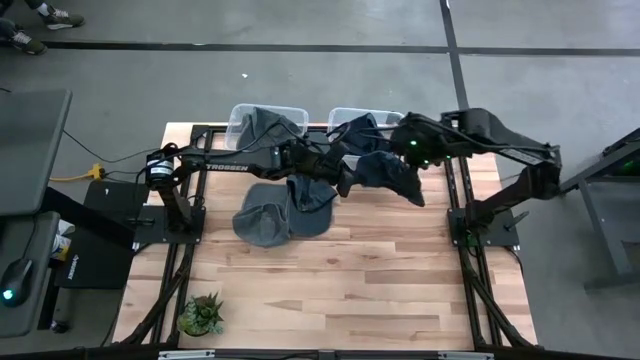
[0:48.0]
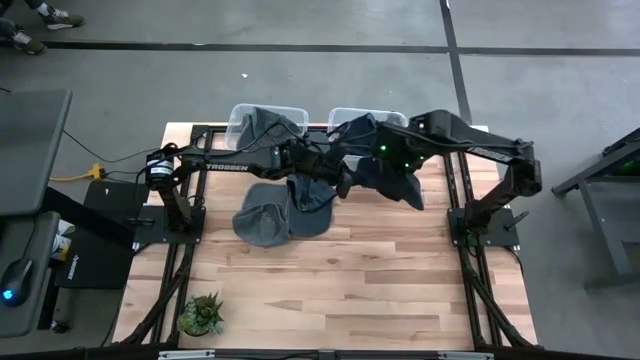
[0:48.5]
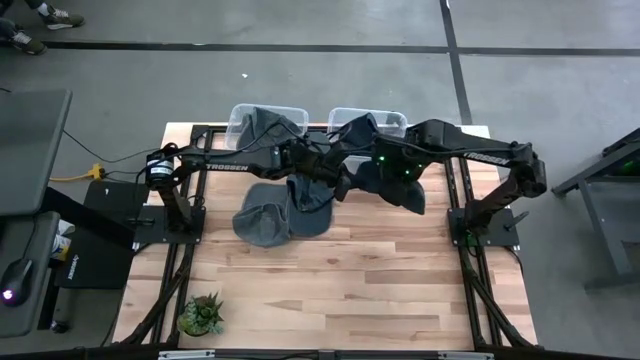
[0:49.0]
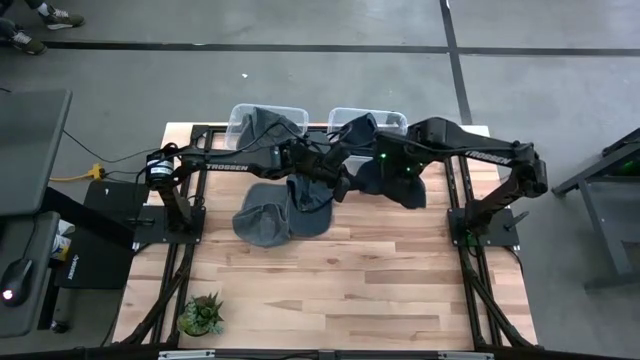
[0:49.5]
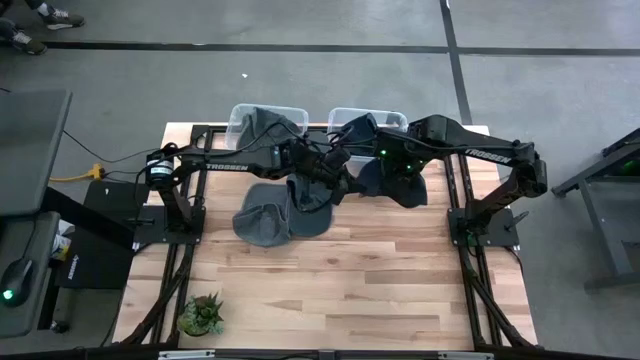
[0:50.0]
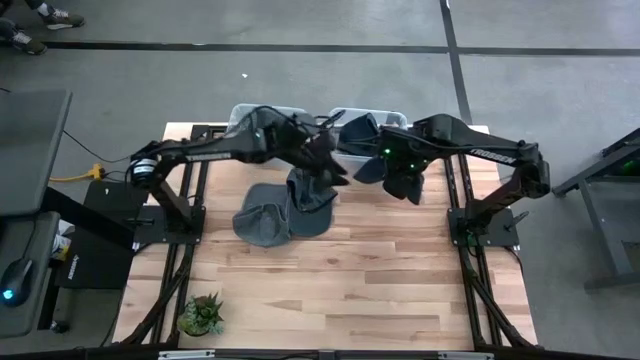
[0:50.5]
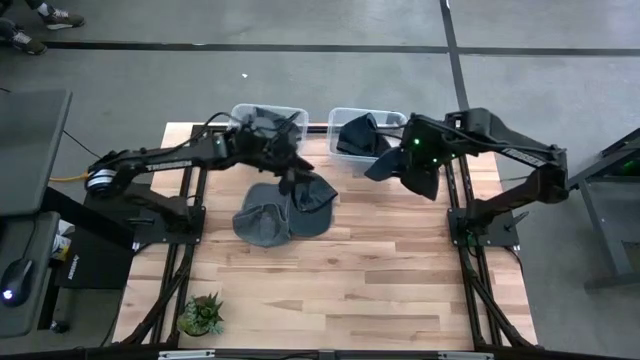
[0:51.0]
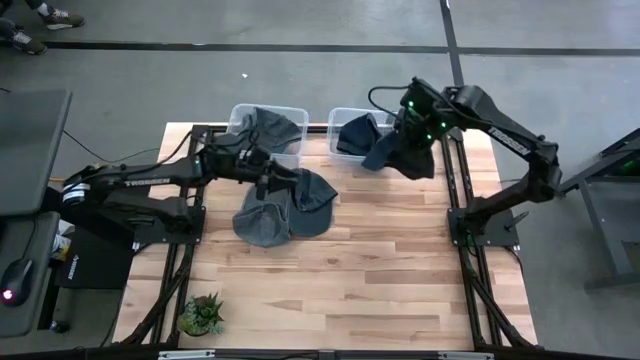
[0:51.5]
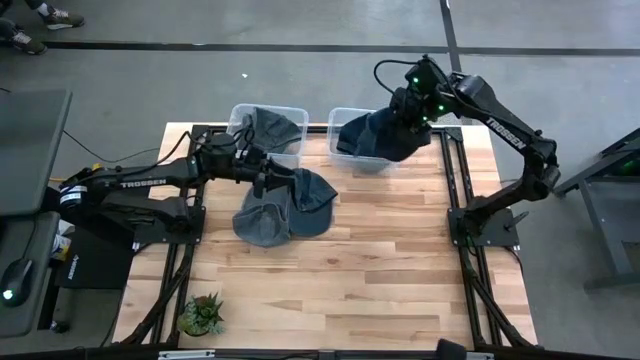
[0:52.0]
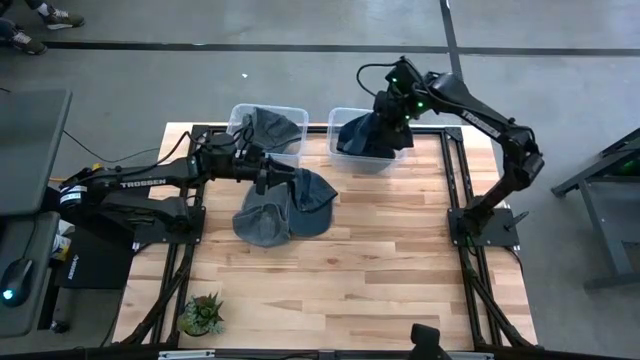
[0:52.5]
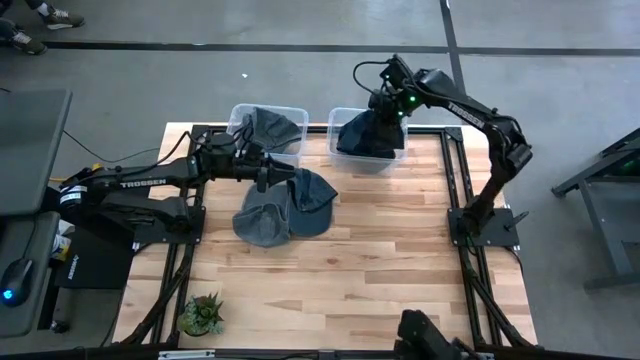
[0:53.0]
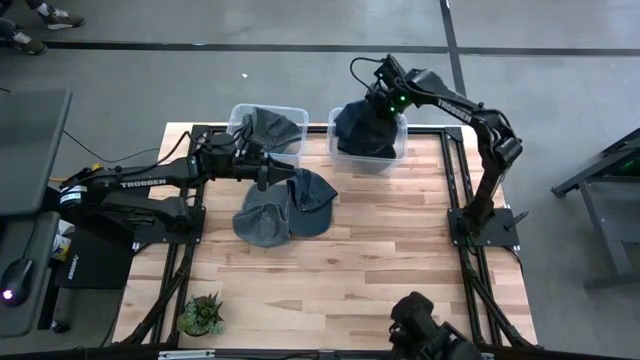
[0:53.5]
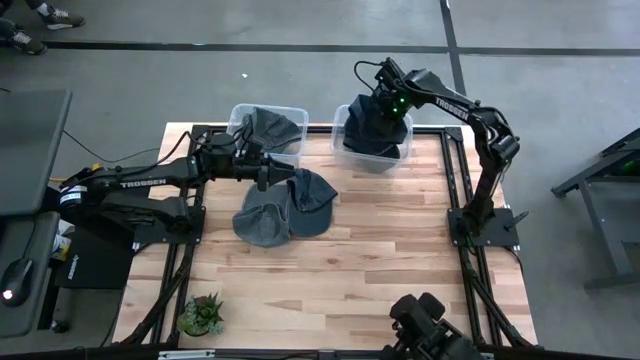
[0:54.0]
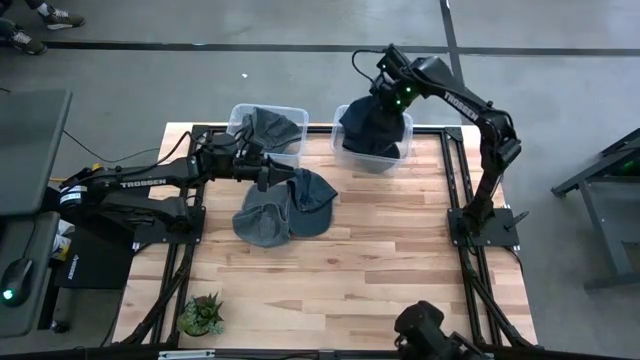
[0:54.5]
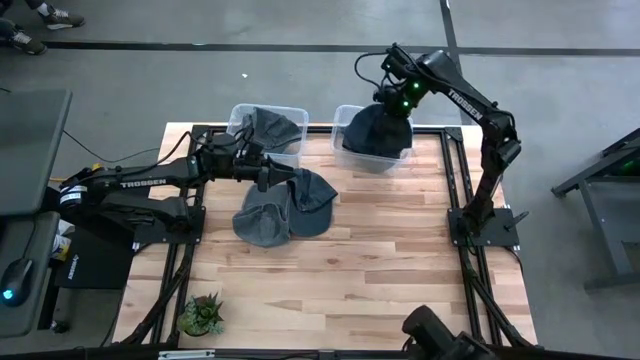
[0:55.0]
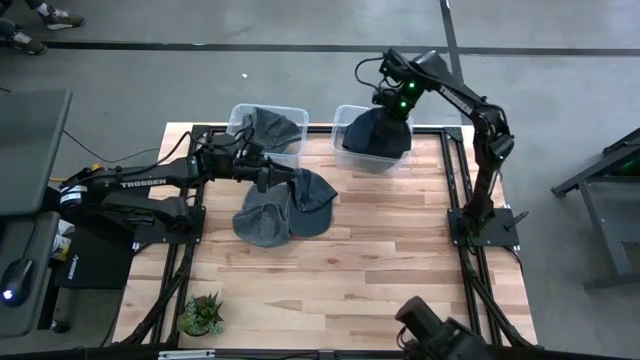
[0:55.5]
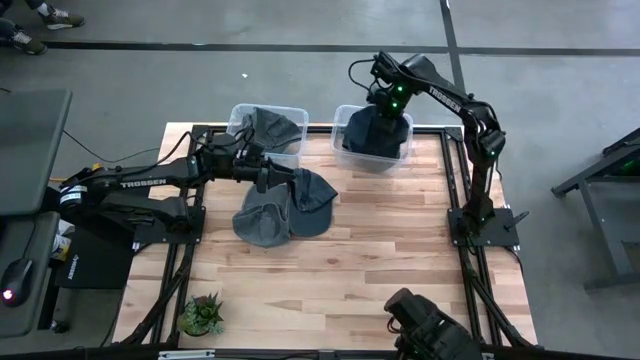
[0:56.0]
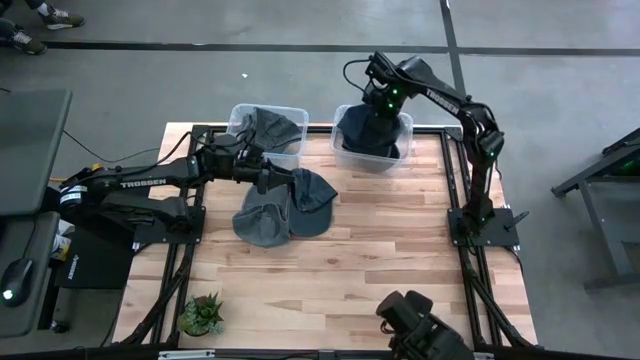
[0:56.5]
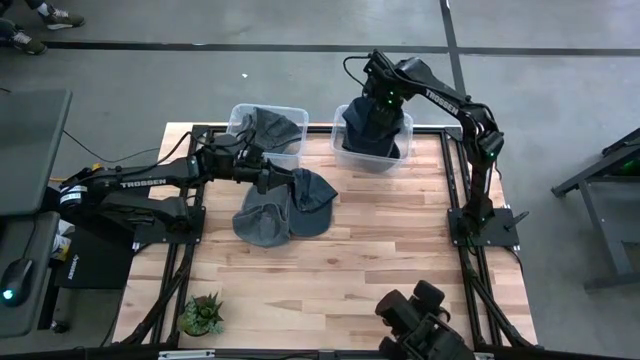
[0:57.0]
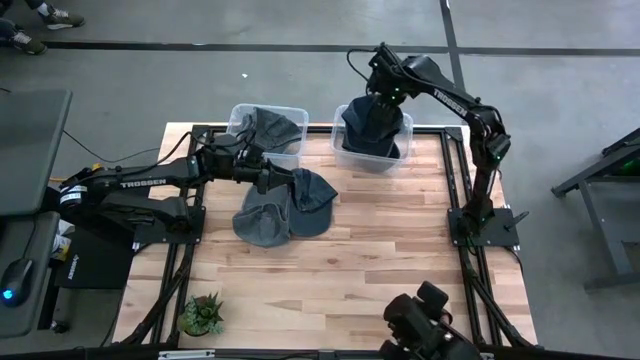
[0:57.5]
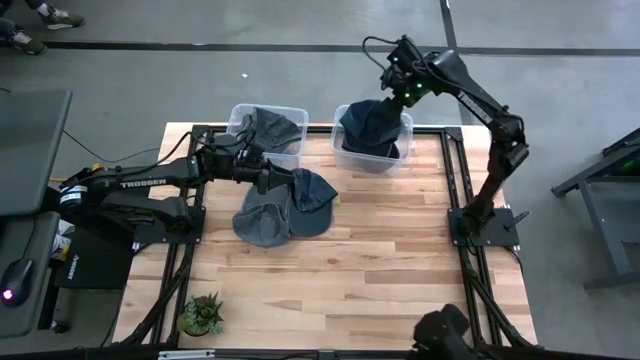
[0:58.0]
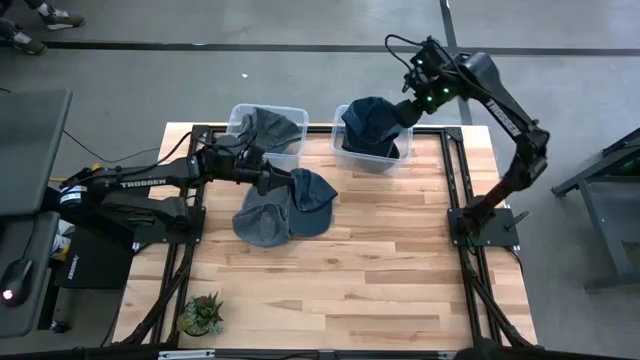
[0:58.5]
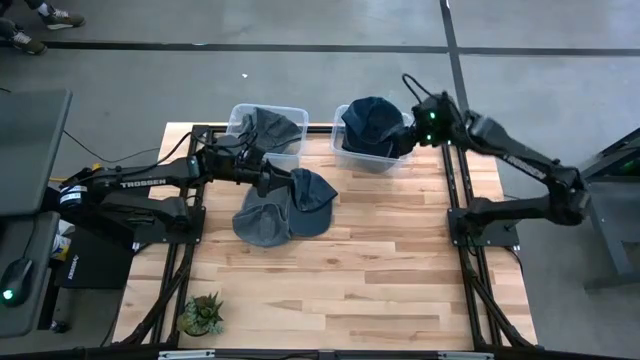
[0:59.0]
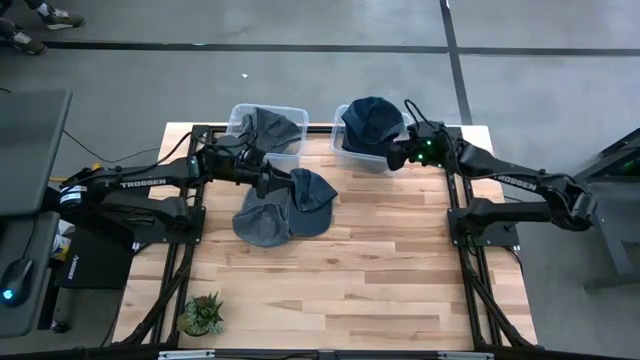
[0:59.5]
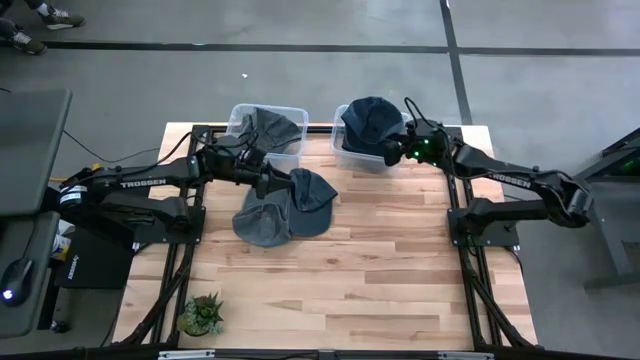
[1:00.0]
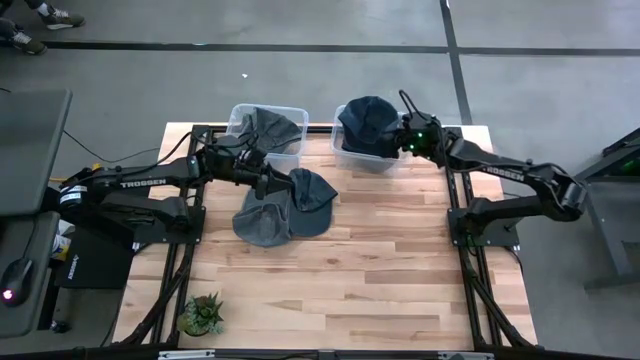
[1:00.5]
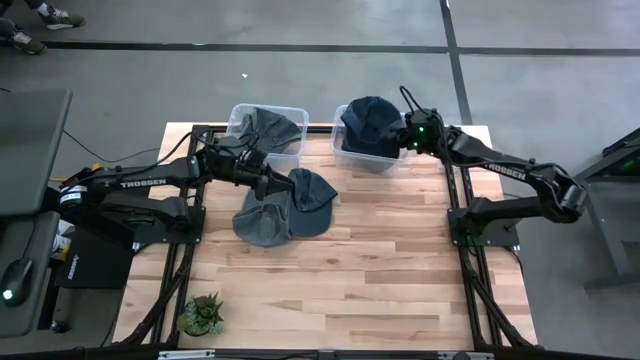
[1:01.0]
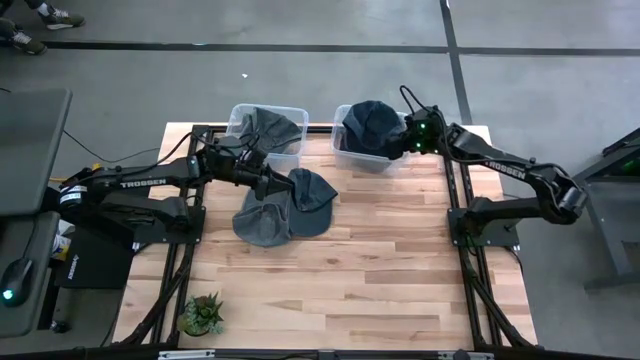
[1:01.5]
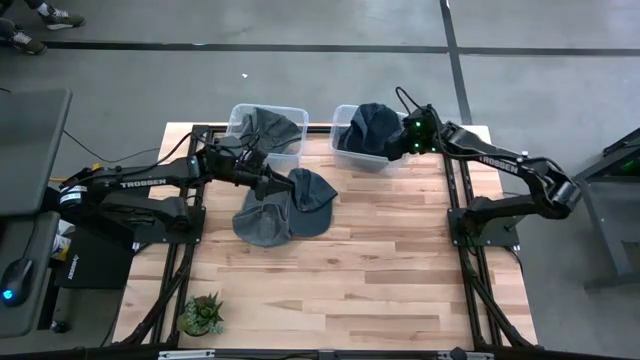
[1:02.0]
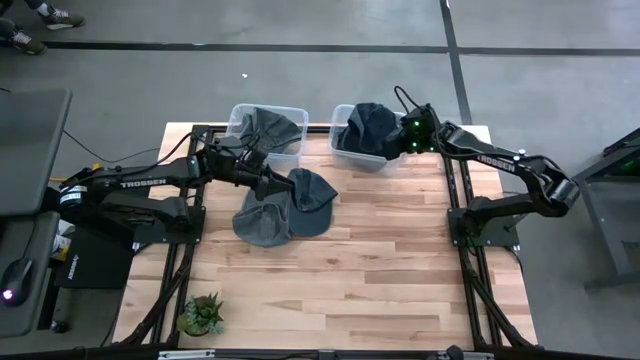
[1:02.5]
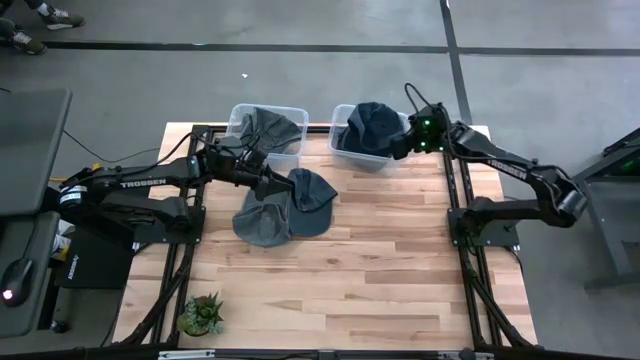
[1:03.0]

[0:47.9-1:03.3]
Task: Pick & Place hat
Put the right black cap into the right transparent bin

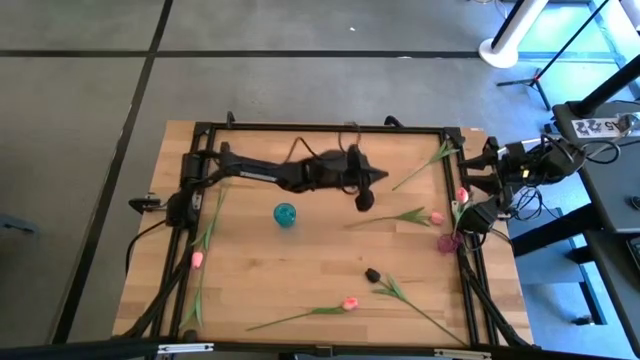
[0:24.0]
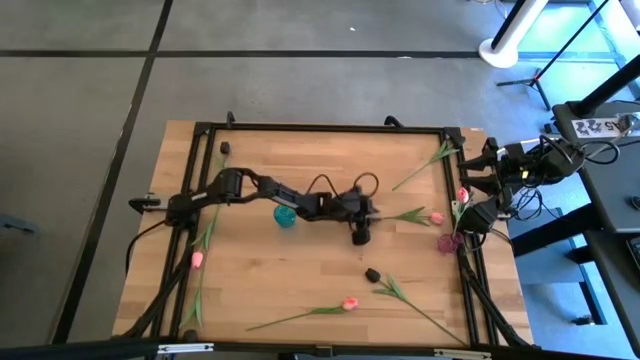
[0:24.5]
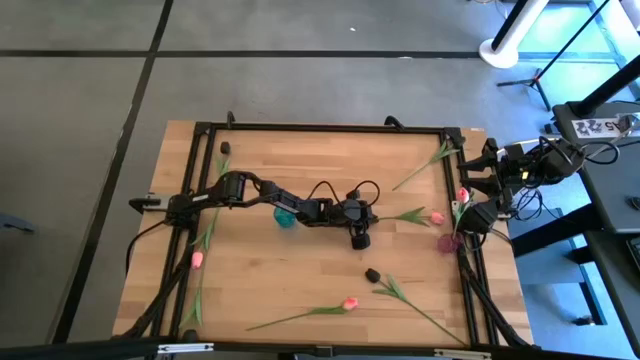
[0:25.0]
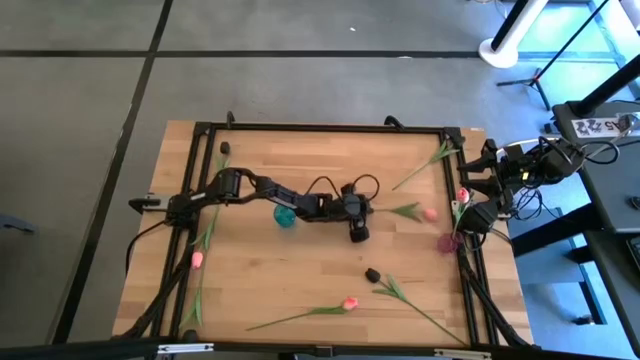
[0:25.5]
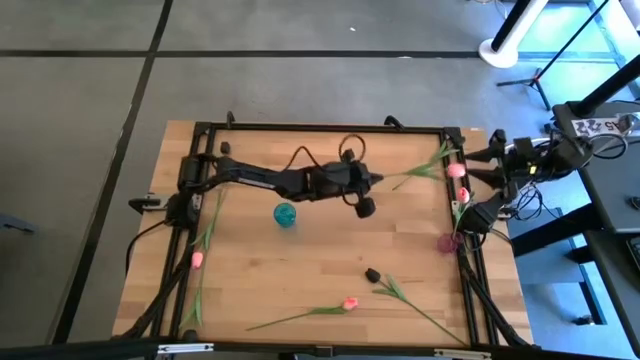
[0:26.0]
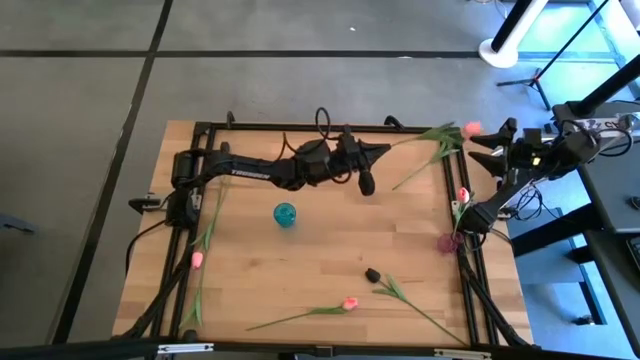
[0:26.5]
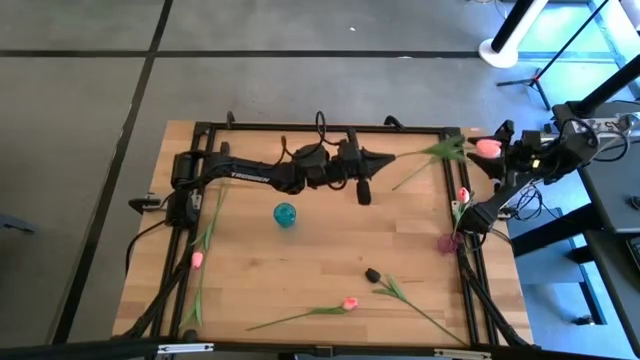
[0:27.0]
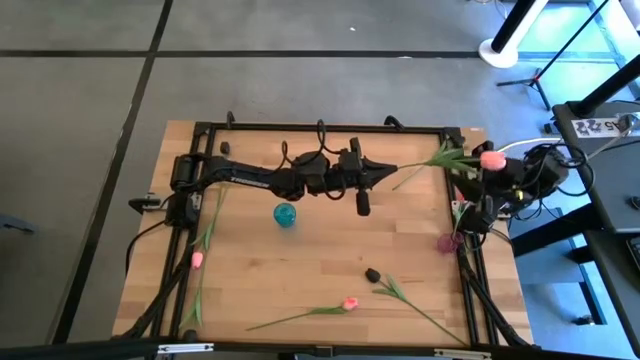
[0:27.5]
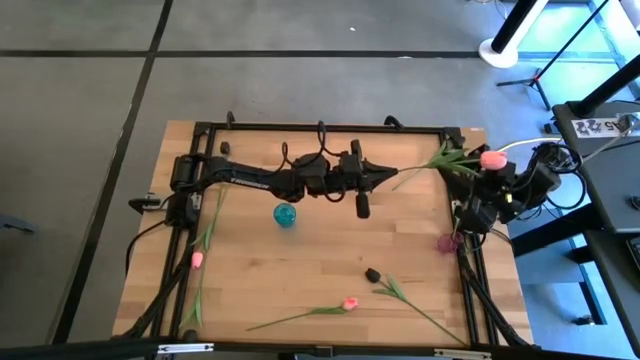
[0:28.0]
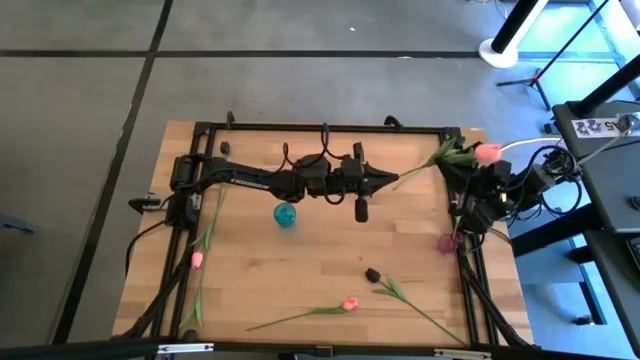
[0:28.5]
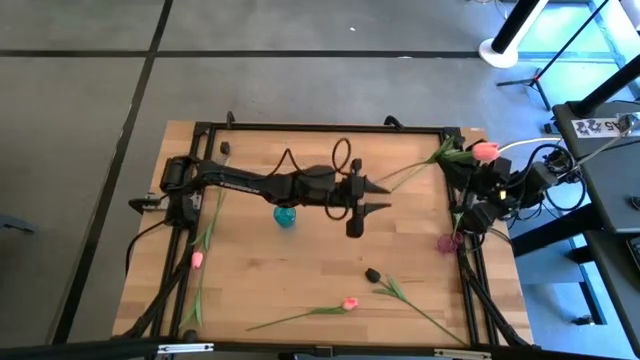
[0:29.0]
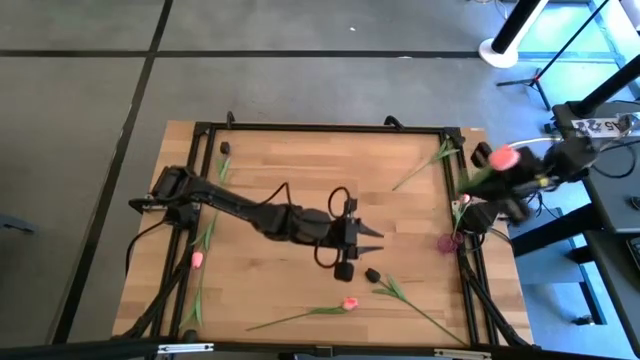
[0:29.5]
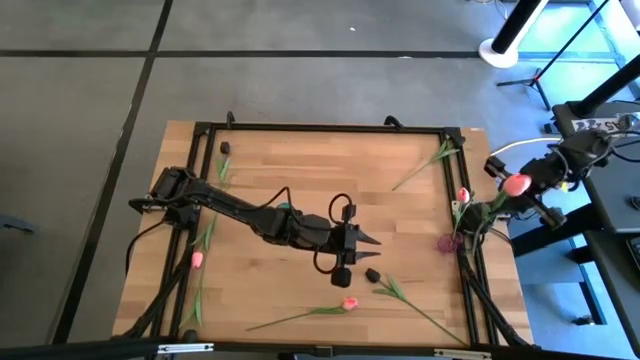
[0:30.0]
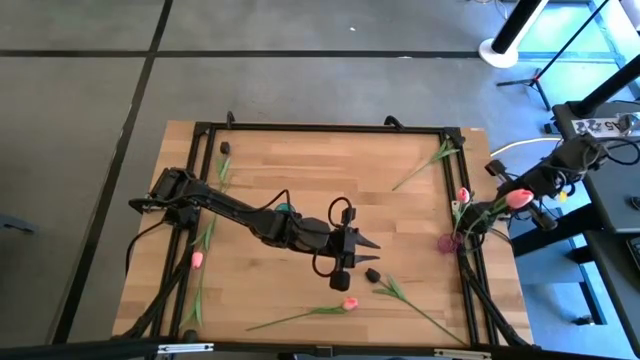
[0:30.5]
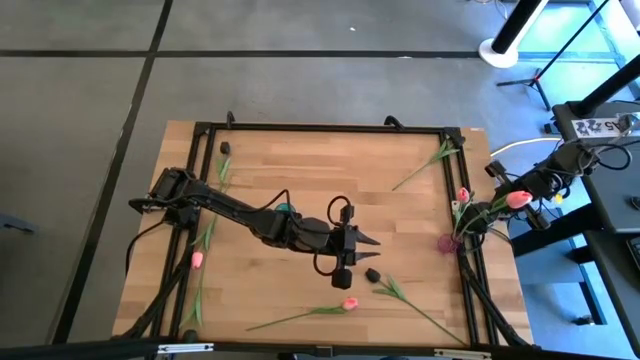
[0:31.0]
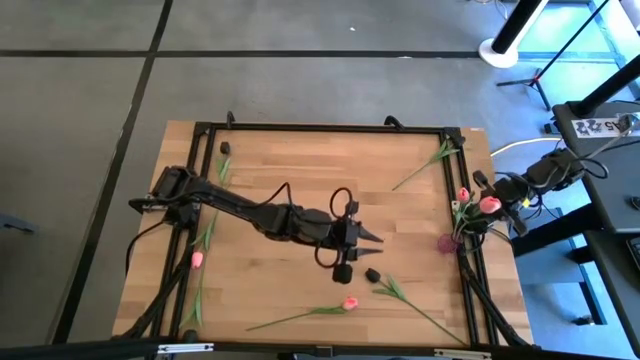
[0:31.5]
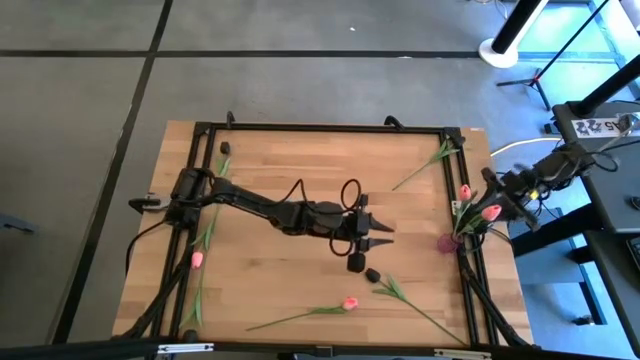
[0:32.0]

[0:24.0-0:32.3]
Task: Sort flowers into vase by color
Put the pink tulip into the purple vase
